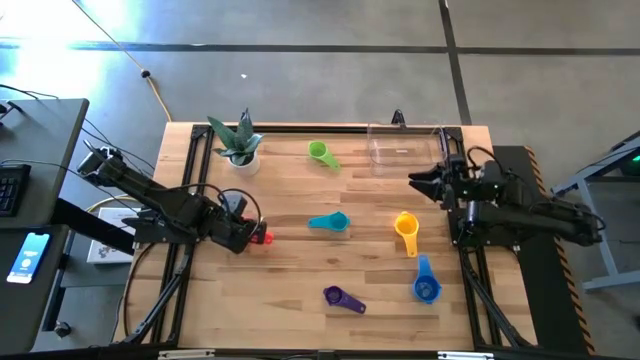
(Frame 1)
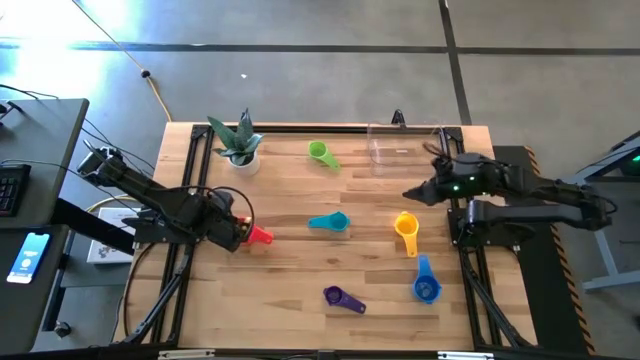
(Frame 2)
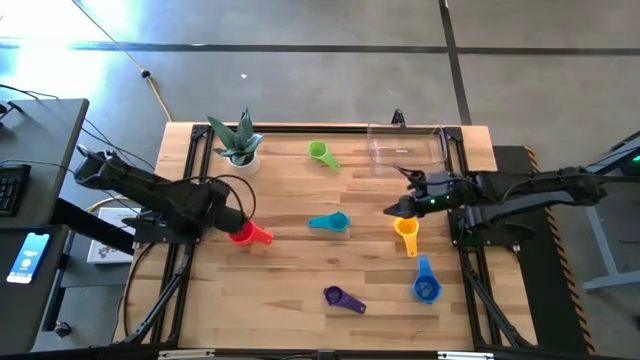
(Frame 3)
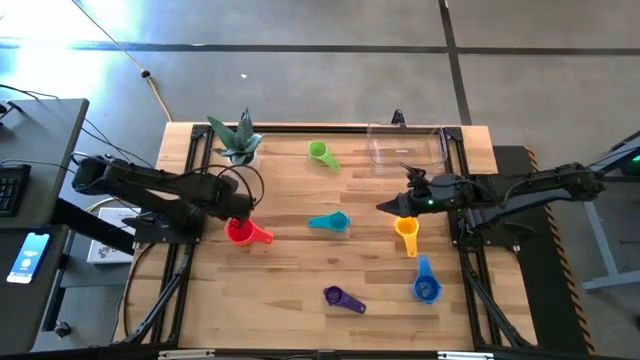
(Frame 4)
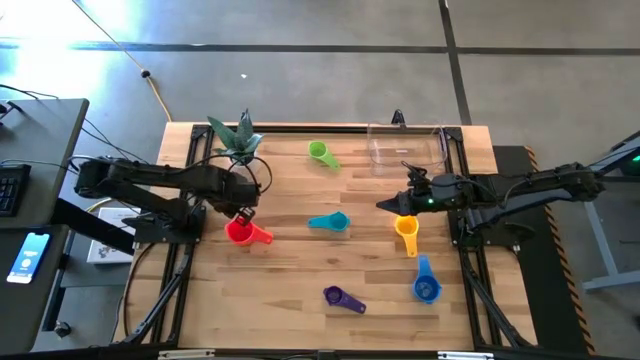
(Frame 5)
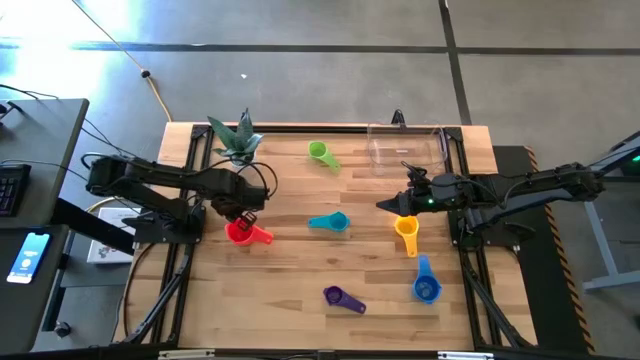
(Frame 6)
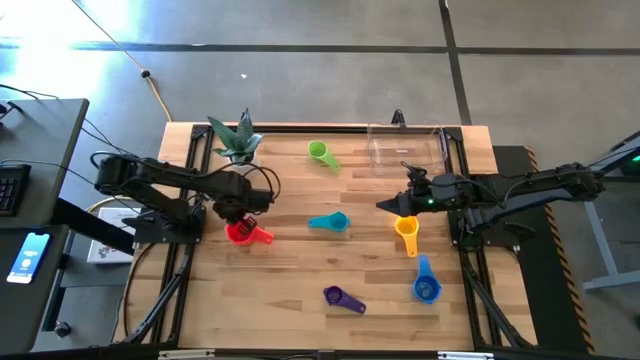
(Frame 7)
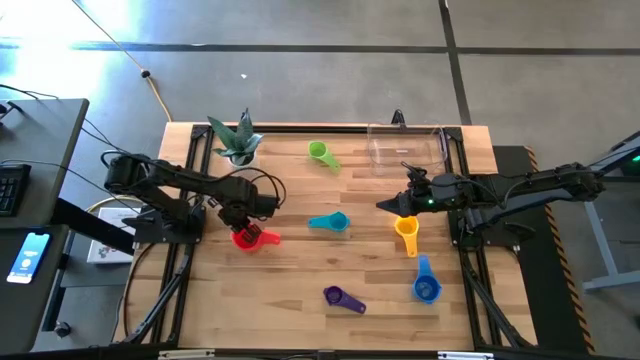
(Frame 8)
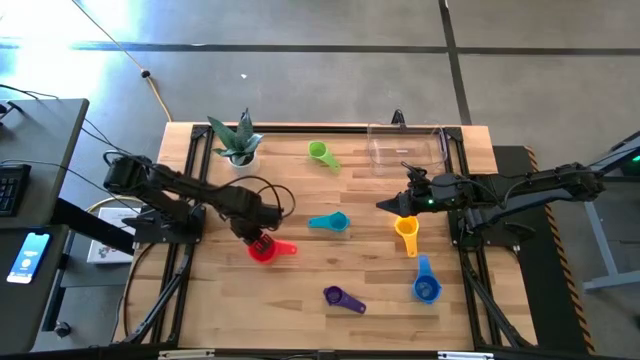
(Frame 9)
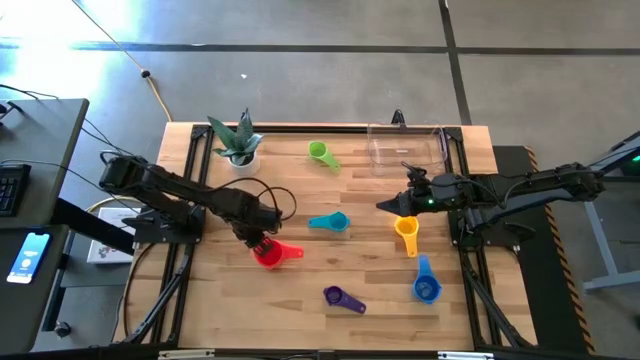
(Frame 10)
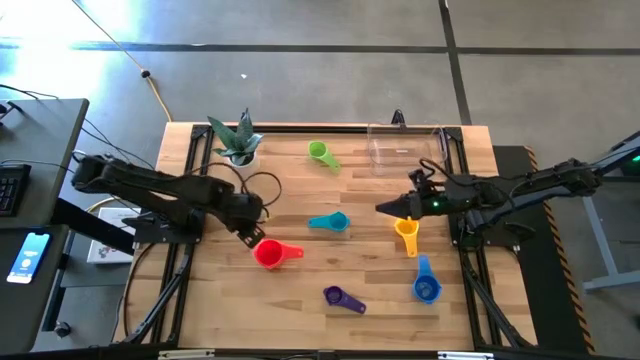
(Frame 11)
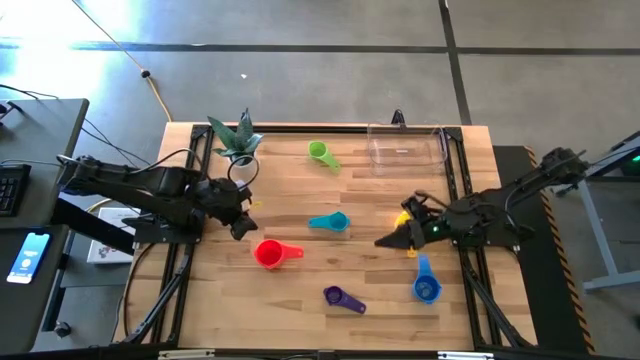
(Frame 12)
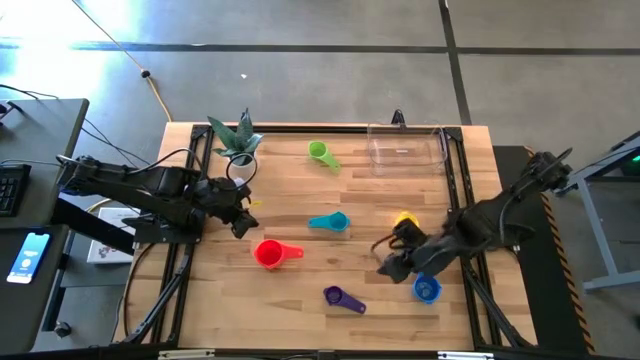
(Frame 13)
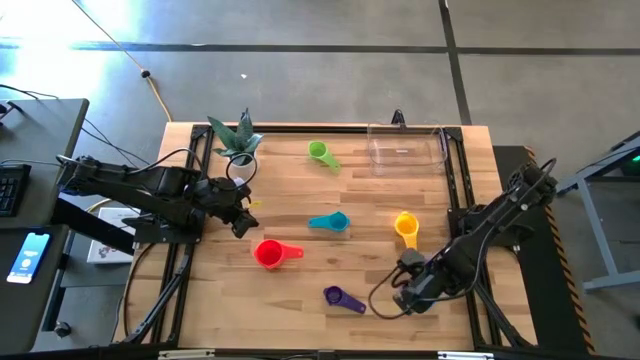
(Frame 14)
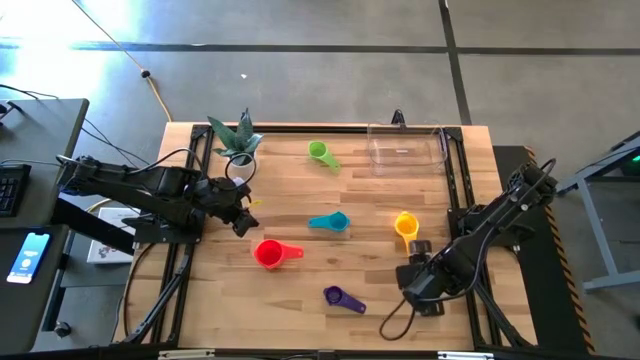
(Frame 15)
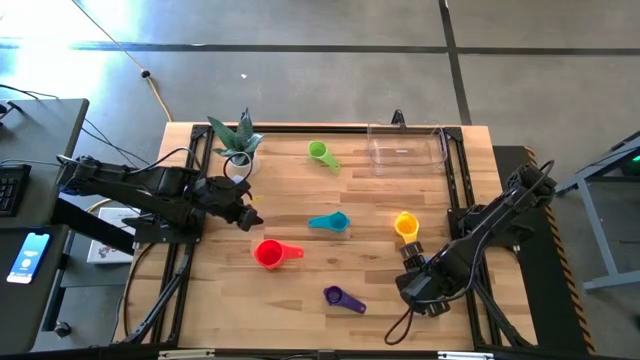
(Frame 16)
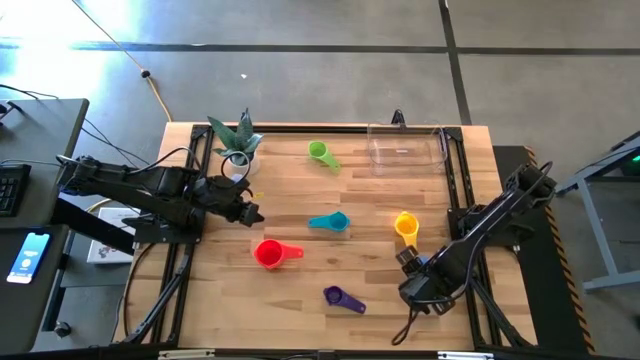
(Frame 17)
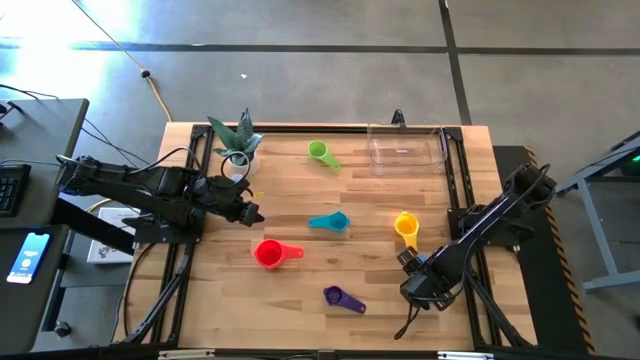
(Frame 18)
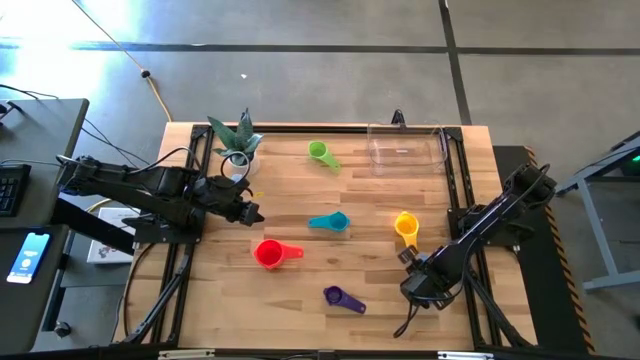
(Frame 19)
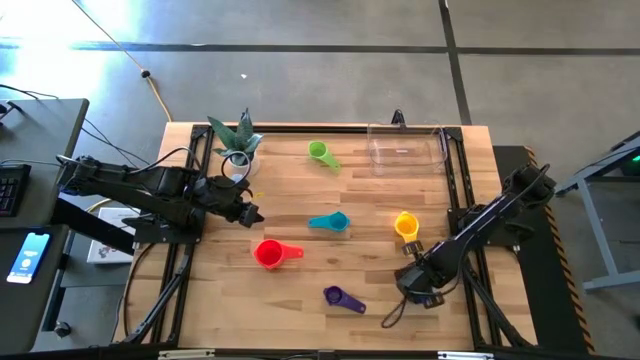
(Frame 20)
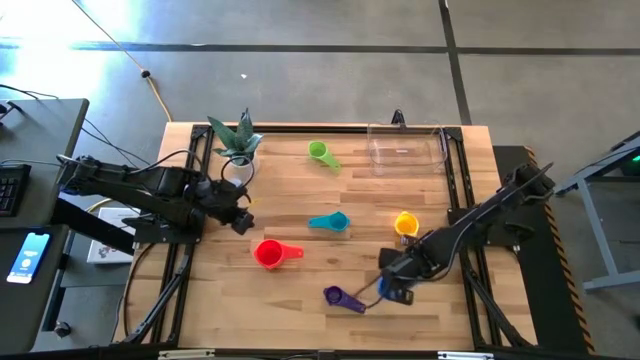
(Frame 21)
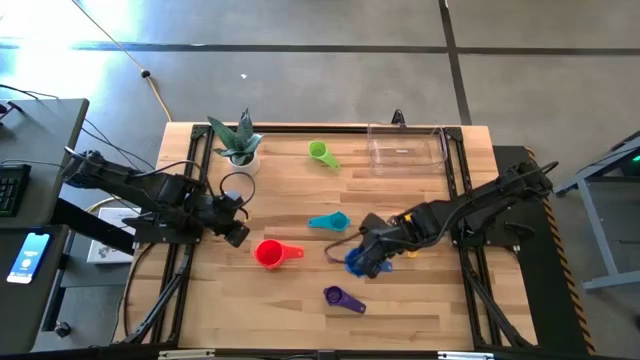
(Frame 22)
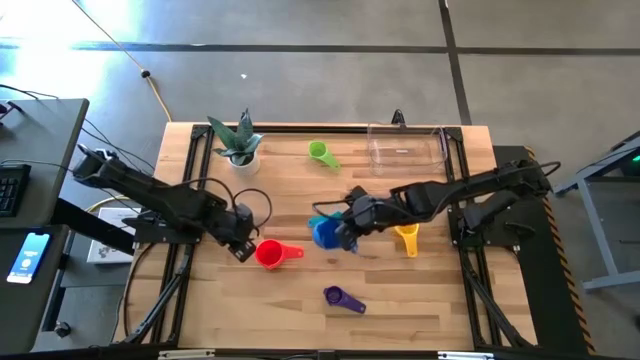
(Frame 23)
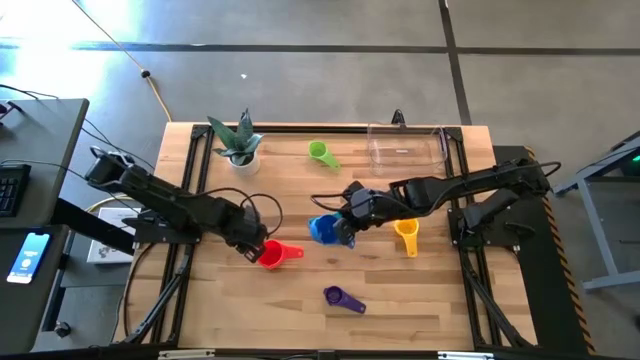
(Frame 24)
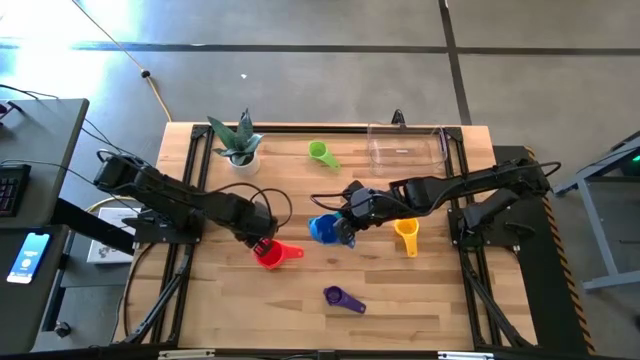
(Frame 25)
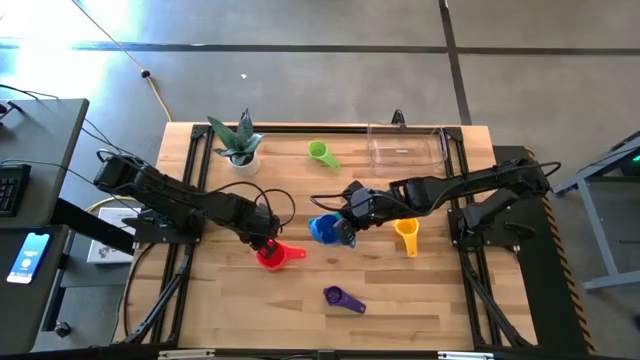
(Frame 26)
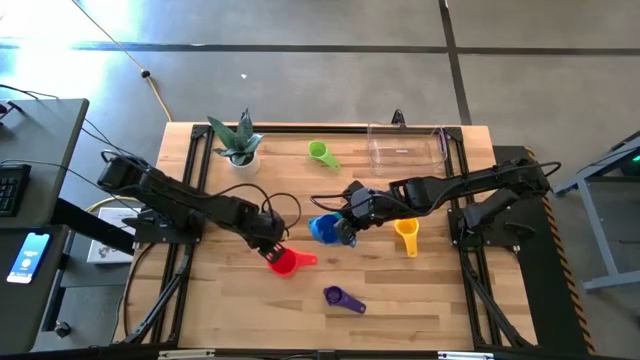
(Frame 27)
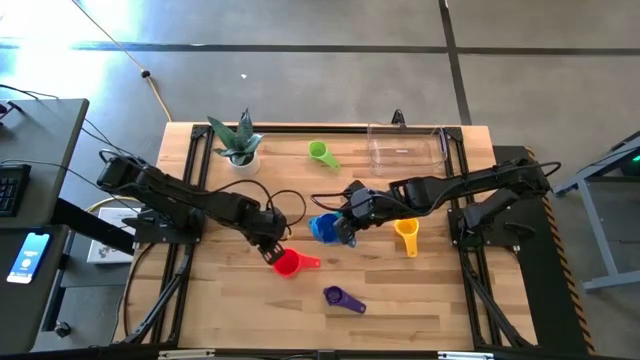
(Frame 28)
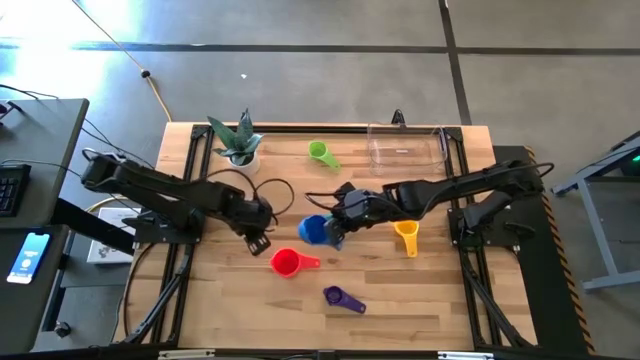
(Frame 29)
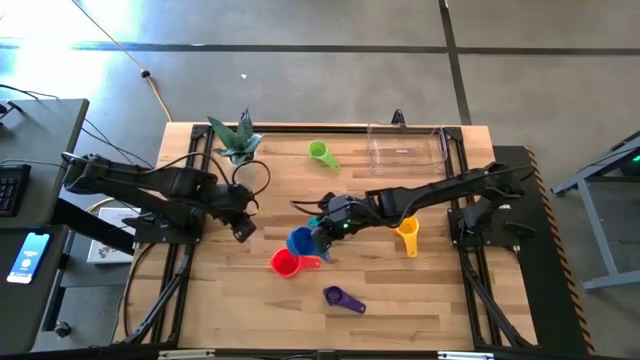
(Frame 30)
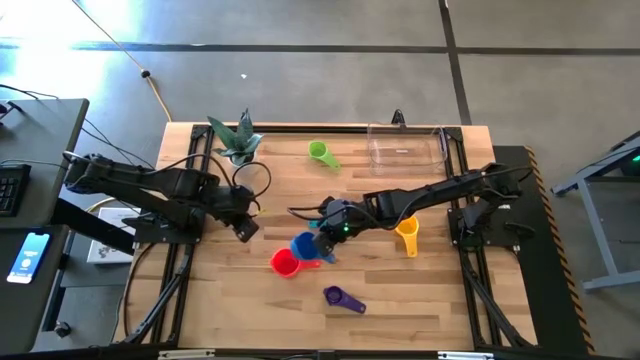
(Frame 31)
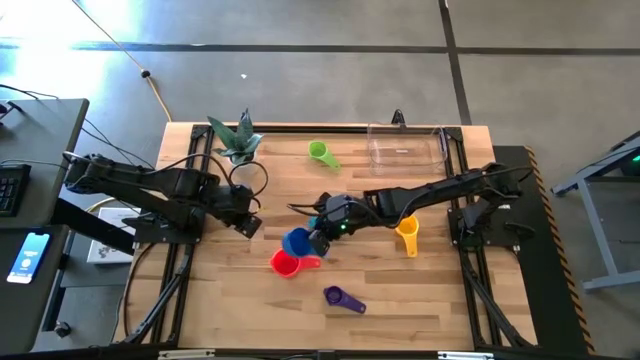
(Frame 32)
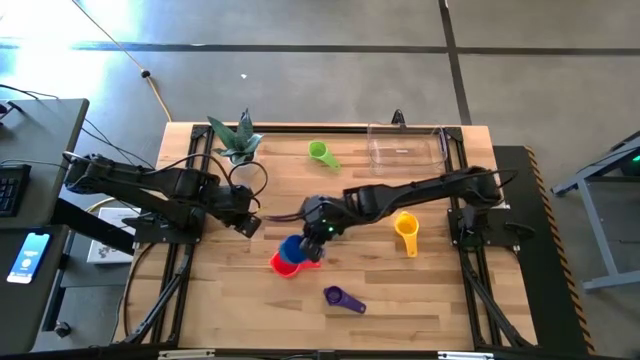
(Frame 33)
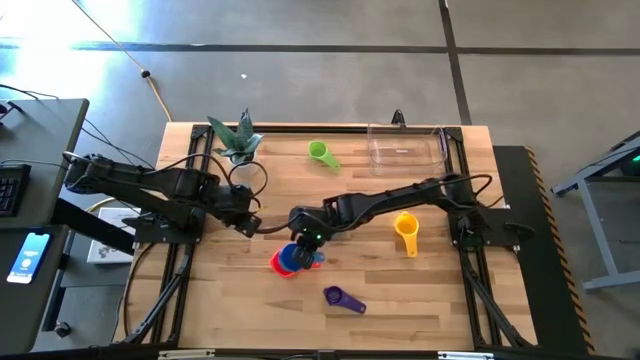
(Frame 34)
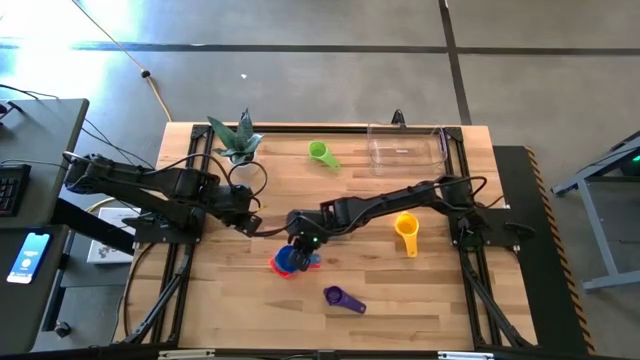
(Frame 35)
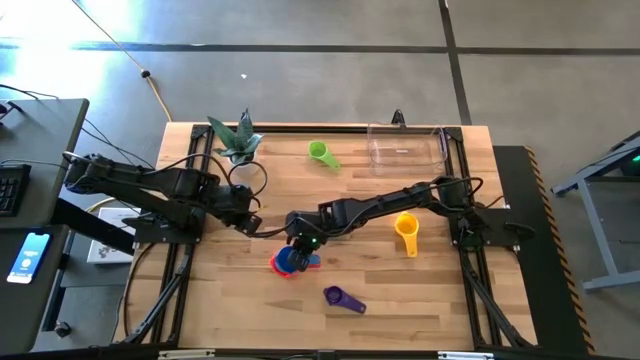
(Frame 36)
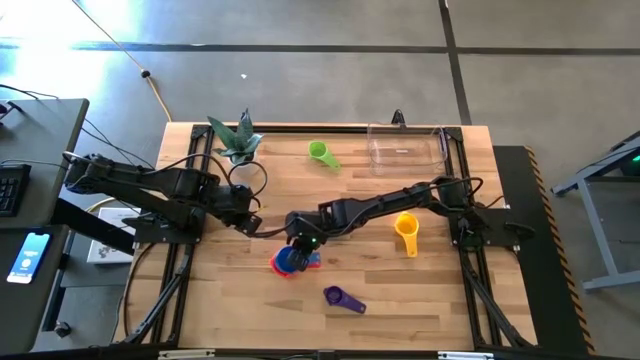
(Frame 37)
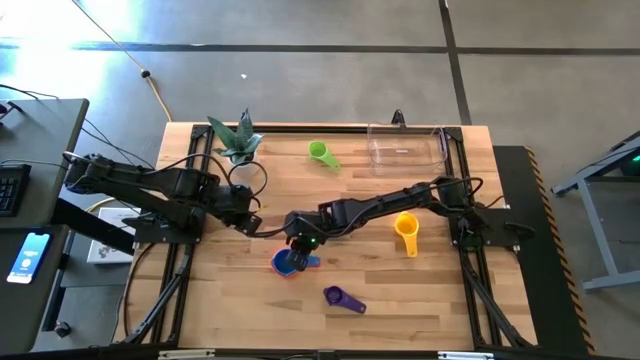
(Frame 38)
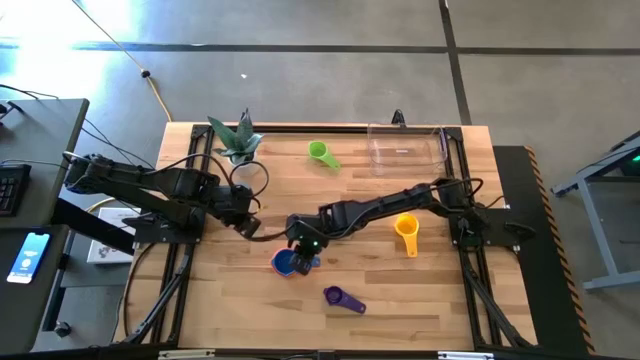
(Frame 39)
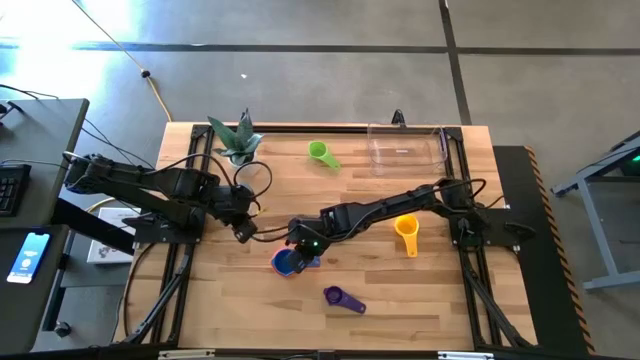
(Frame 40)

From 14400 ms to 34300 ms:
Task: Nest measuring cups in basket
Stack the blue measuring cup into the red measuring cup
